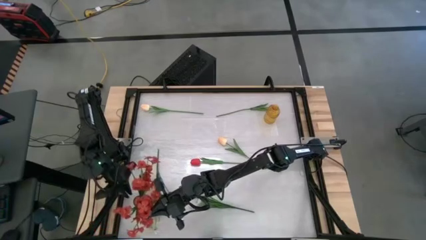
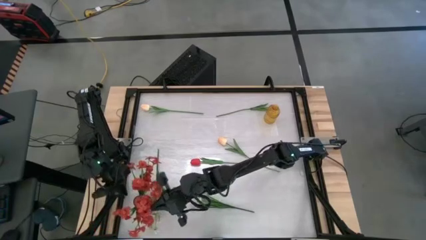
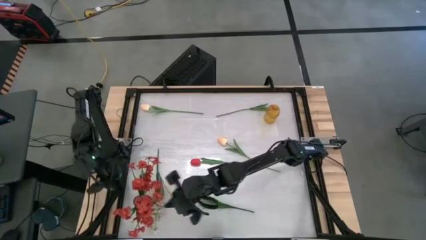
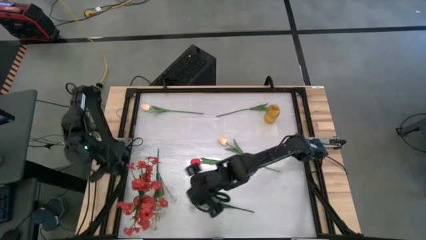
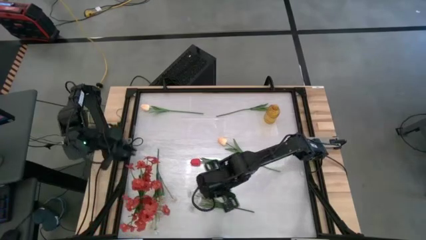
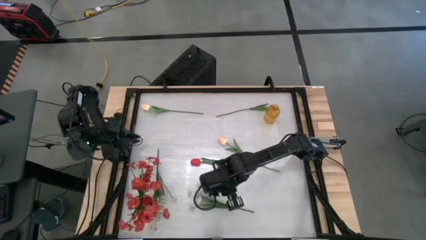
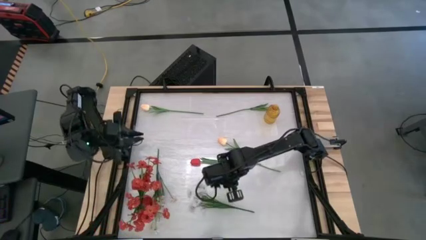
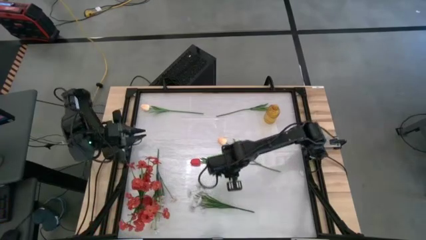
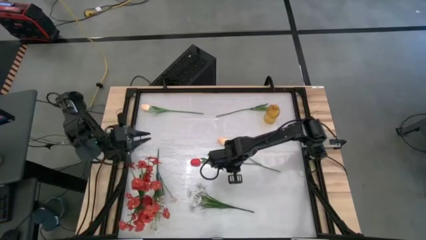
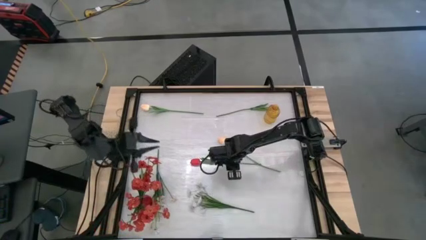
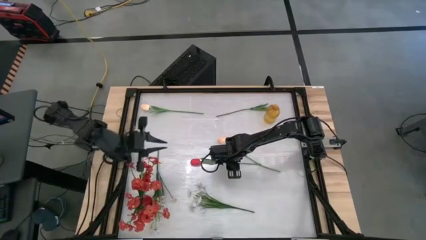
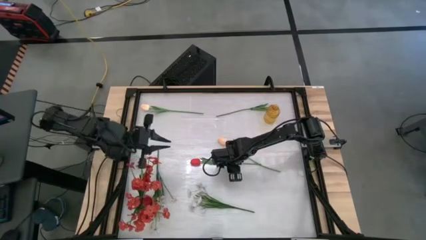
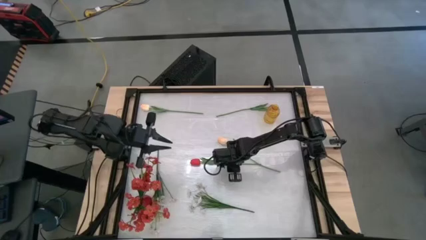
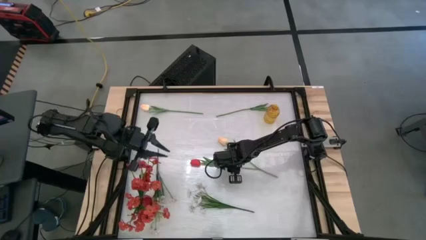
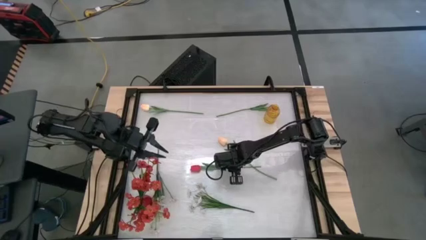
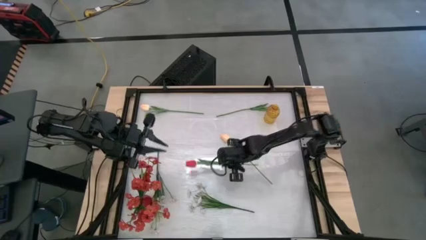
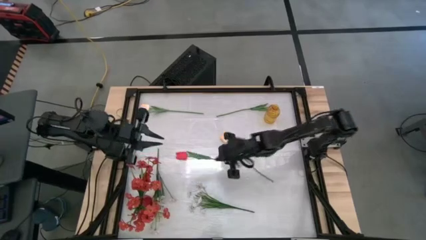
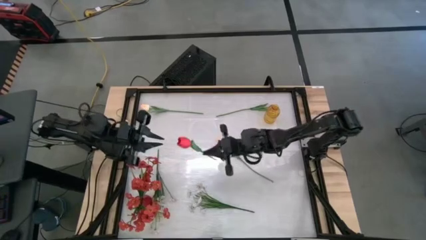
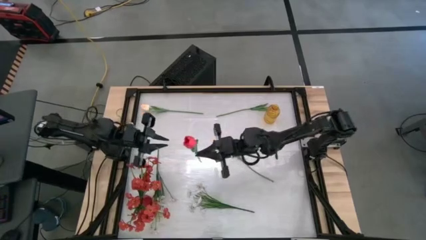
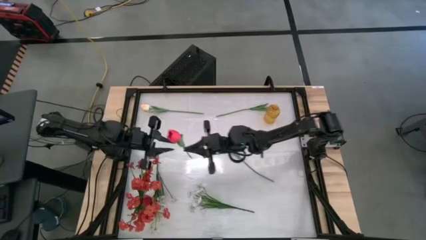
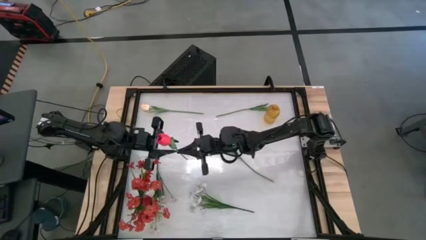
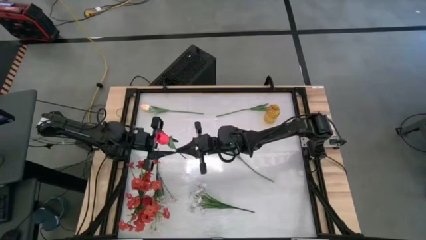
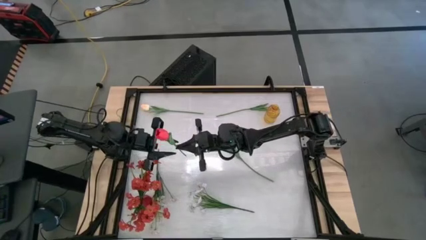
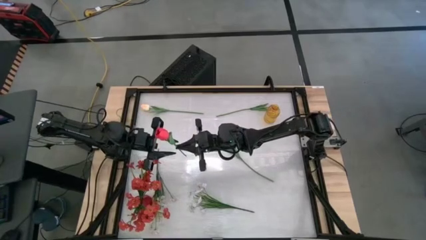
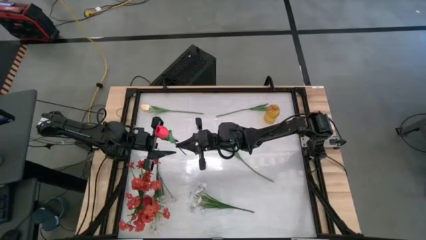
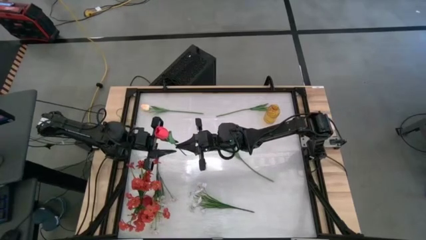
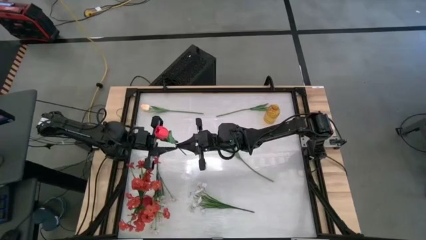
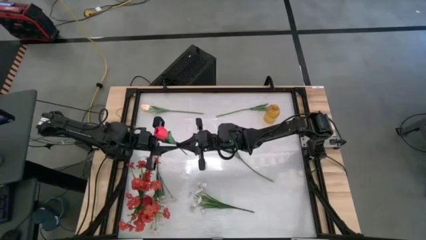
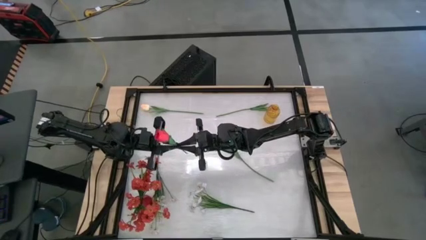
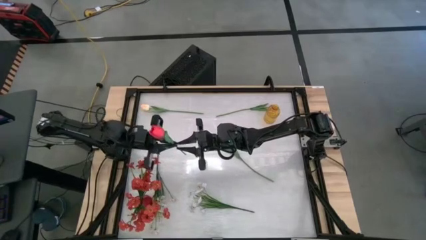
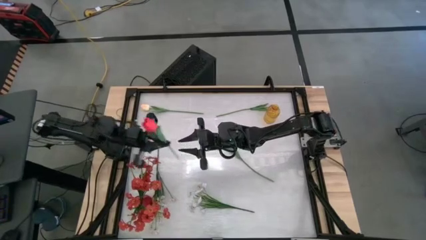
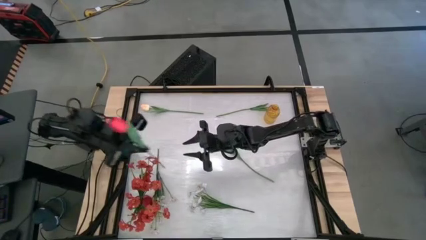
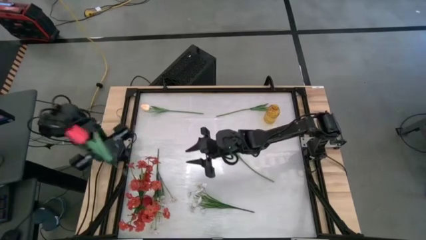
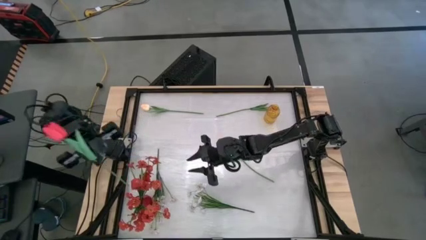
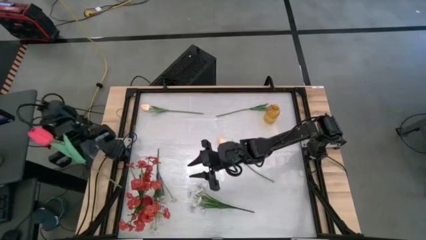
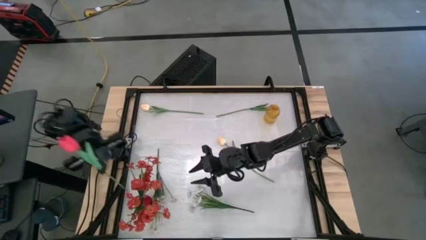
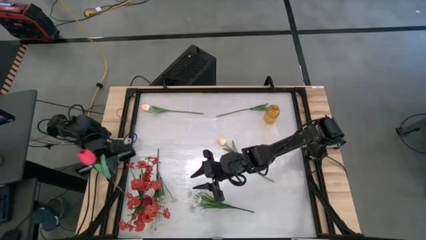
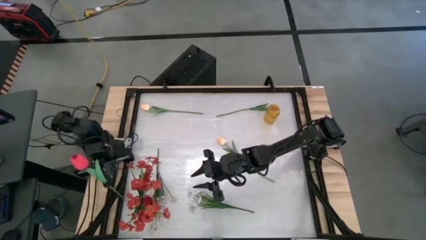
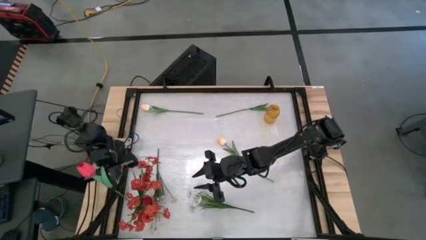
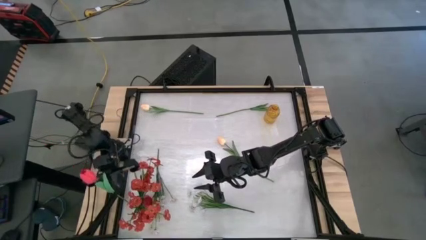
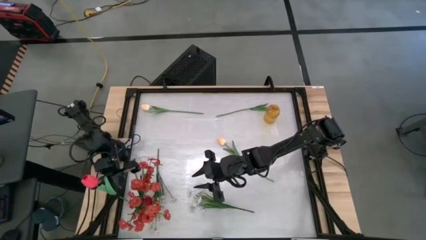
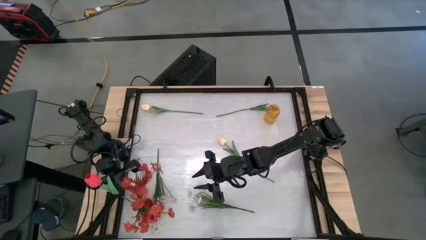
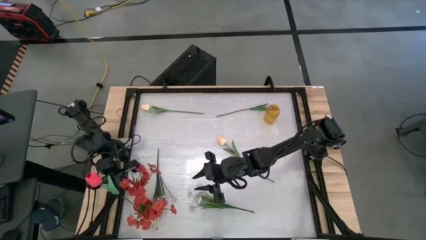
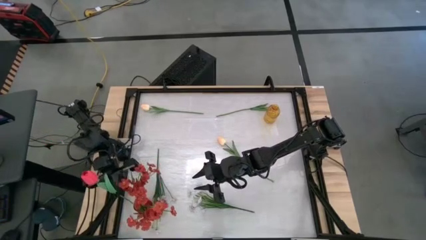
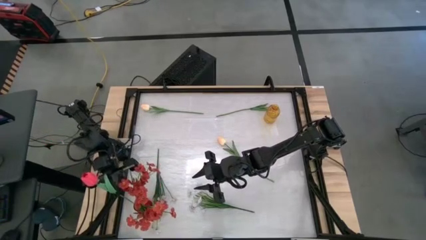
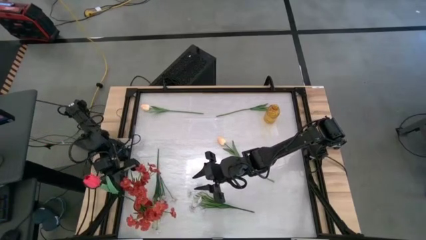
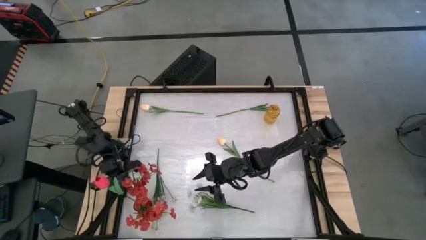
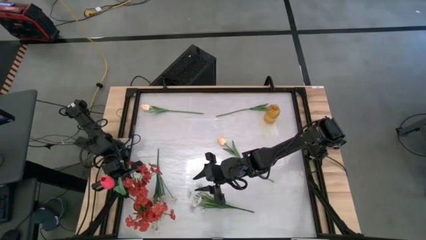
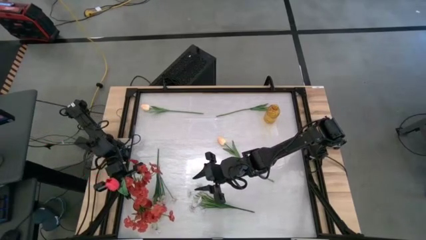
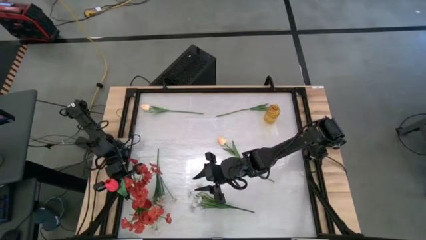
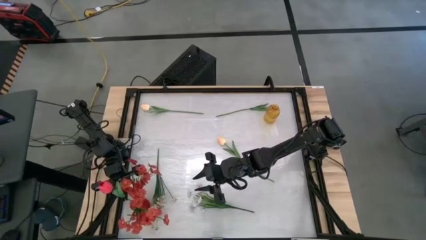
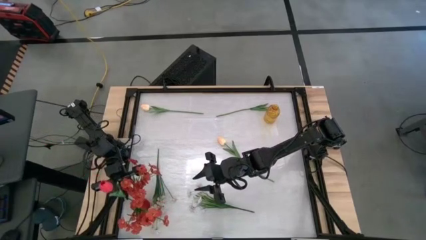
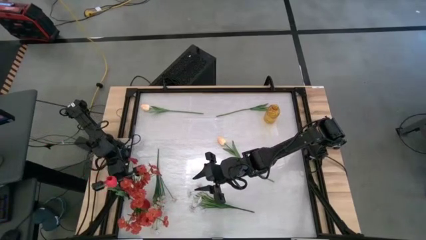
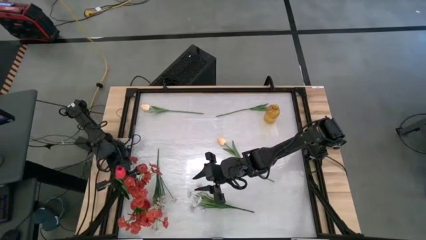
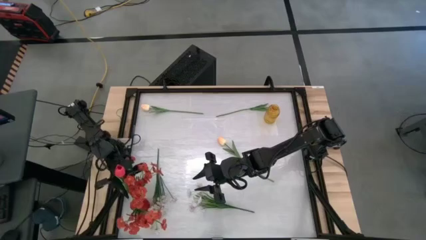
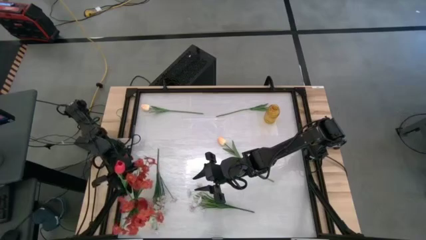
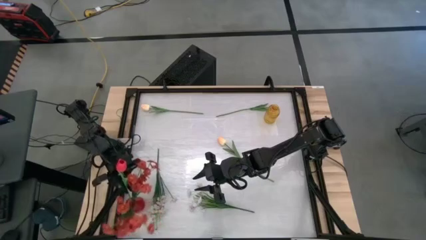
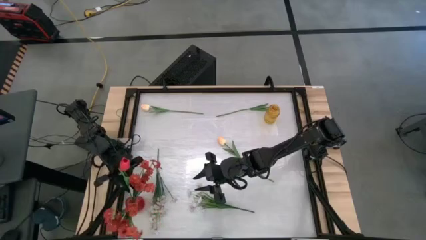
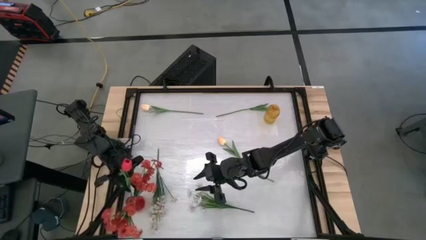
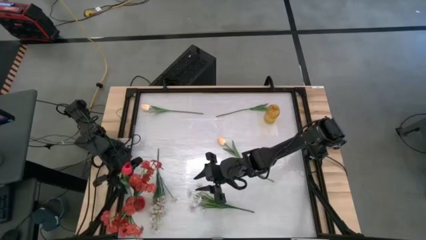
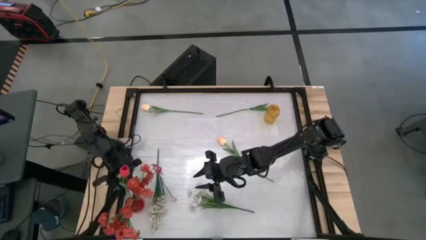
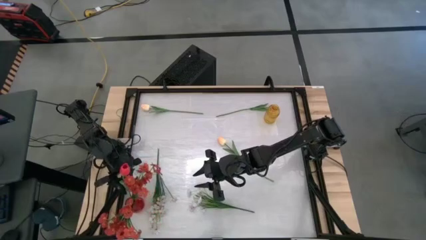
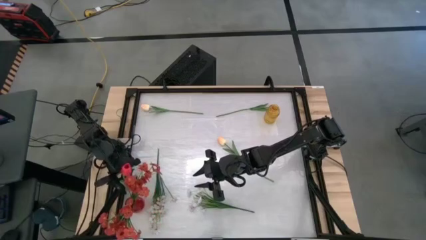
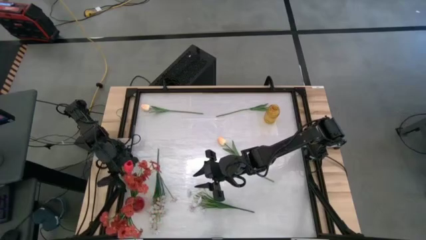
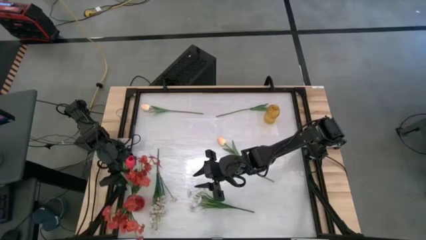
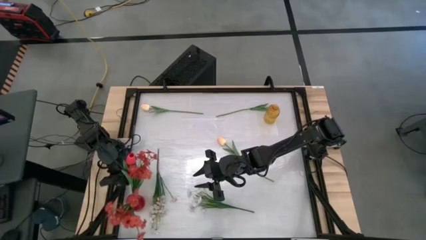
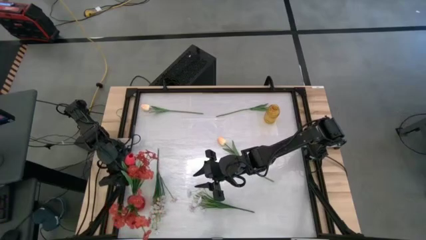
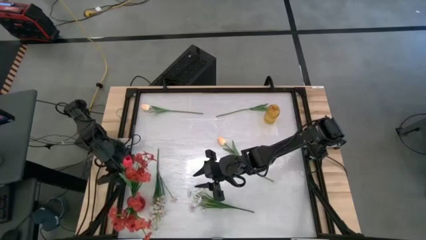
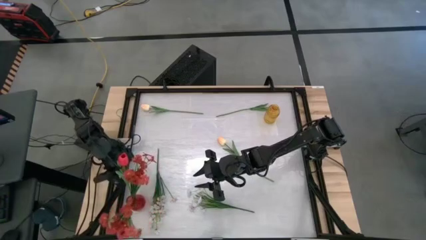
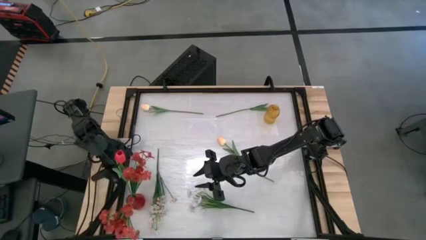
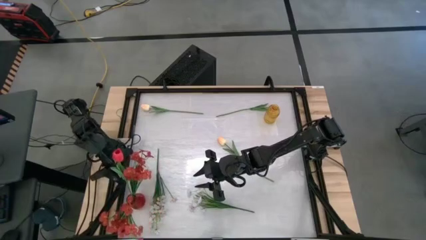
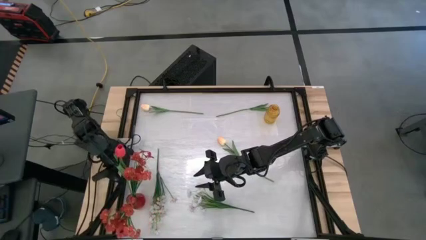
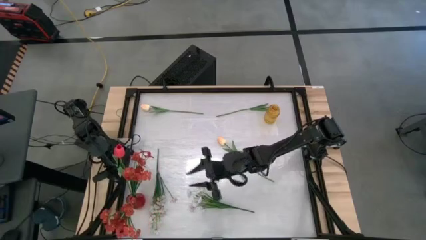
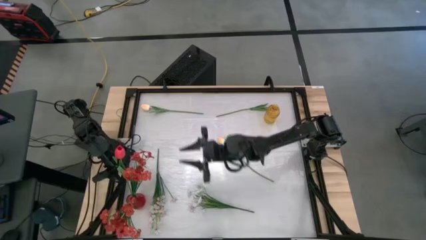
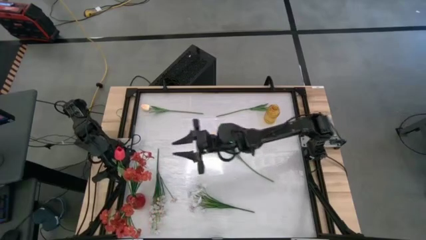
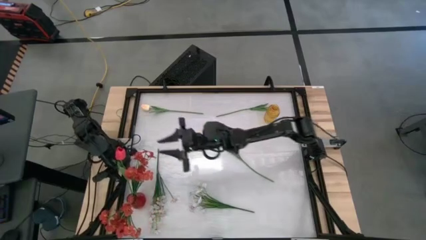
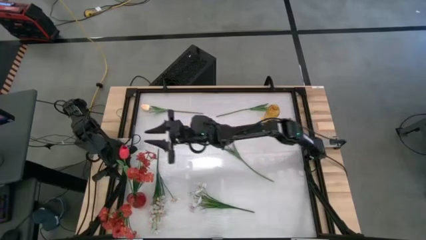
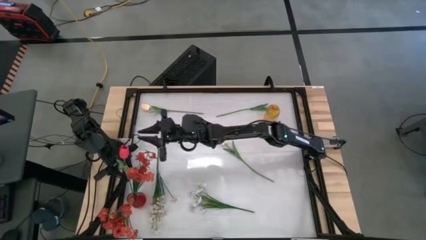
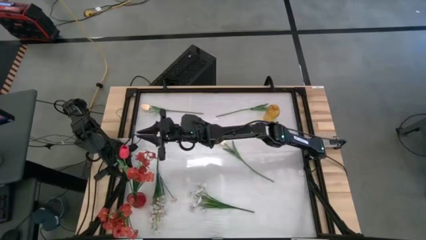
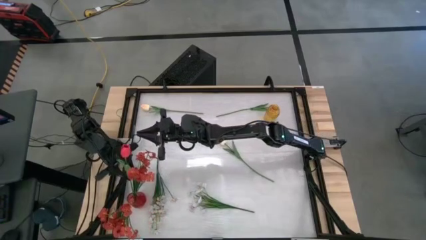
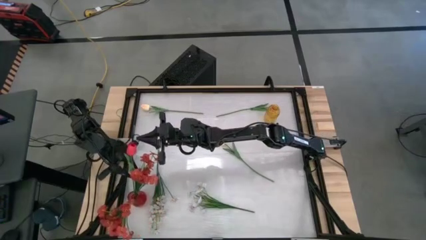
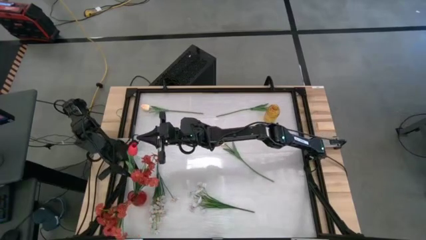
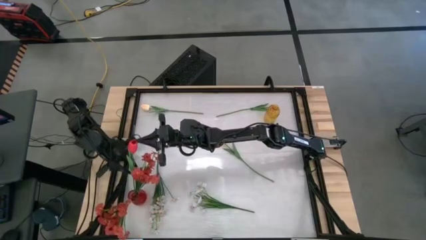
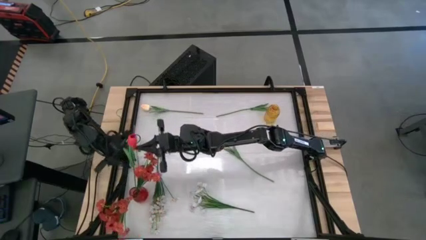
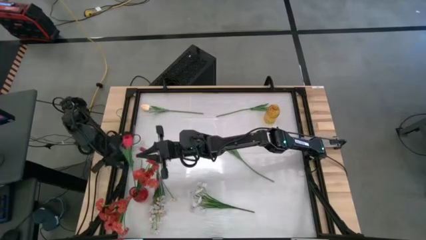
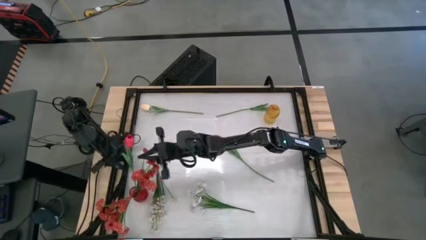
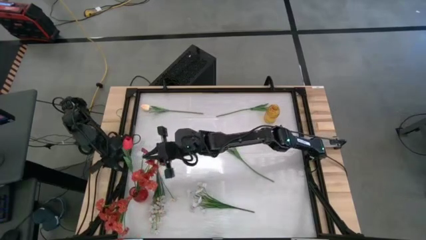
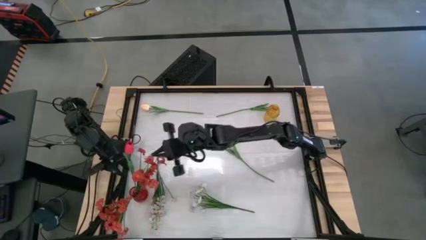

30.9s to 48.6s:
Task: Sort flowers into vase by color
Put the bottom of the red tulip into the red vase
